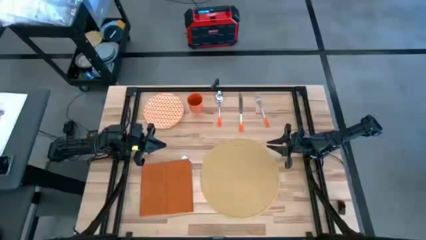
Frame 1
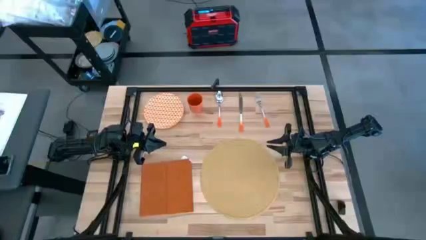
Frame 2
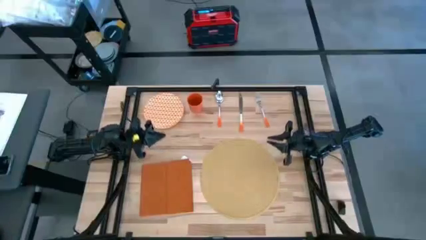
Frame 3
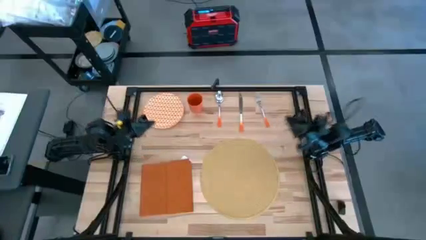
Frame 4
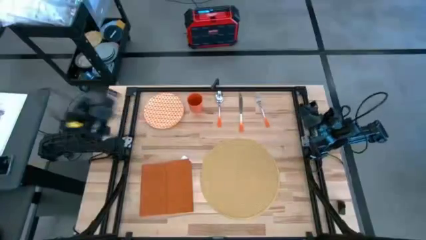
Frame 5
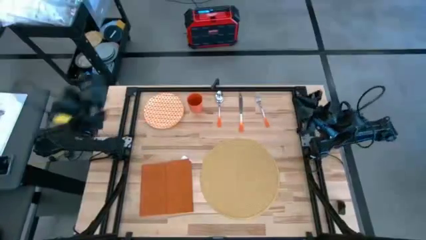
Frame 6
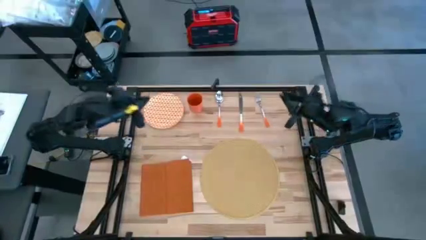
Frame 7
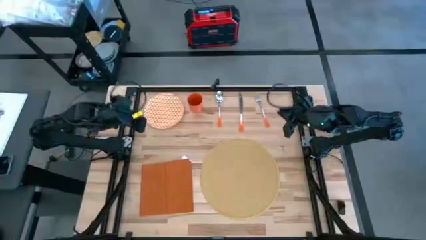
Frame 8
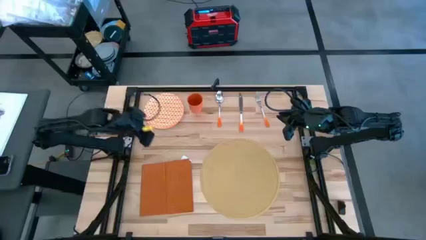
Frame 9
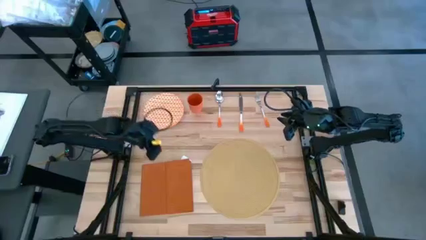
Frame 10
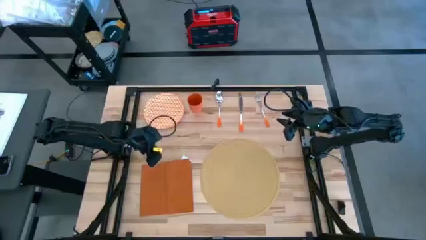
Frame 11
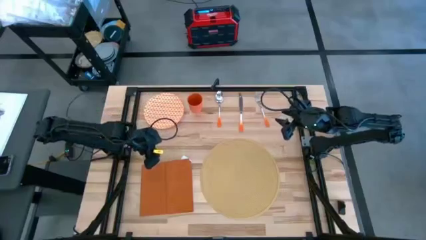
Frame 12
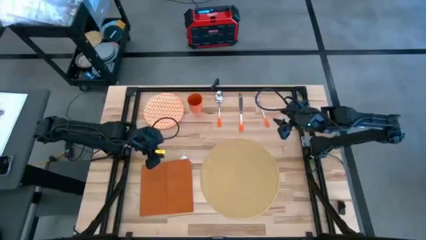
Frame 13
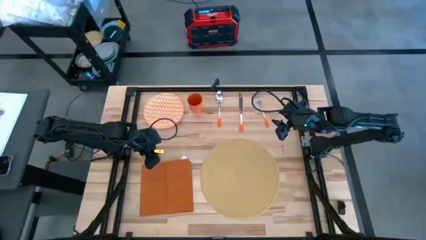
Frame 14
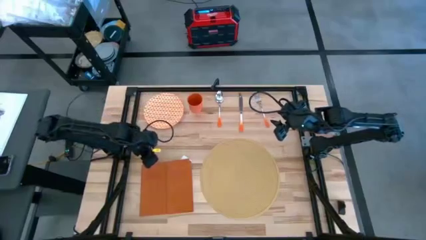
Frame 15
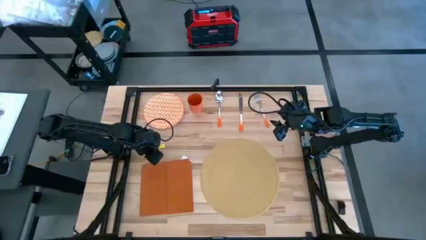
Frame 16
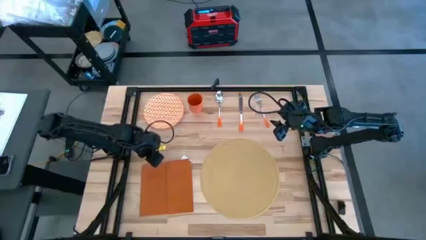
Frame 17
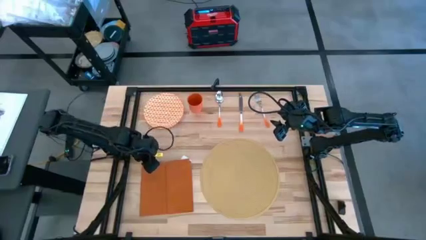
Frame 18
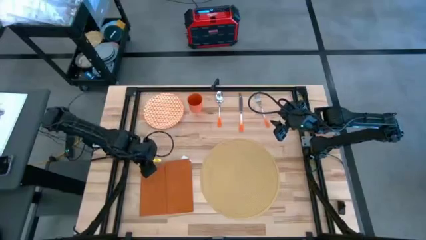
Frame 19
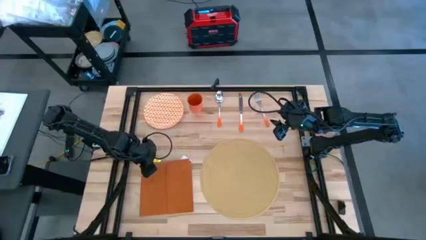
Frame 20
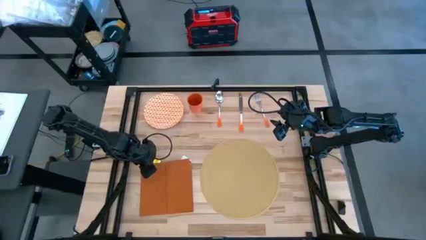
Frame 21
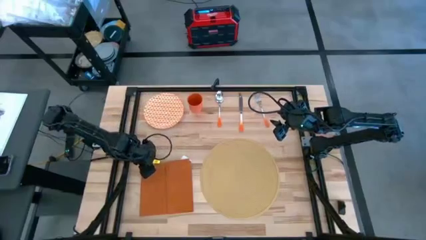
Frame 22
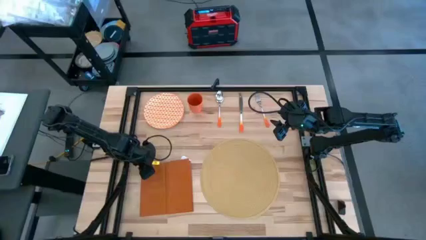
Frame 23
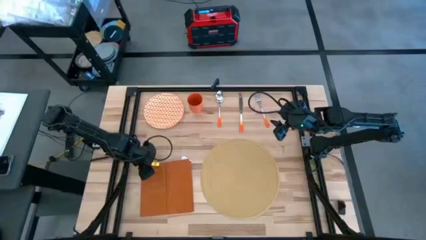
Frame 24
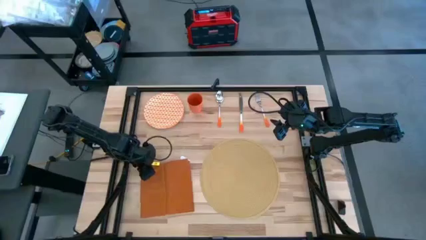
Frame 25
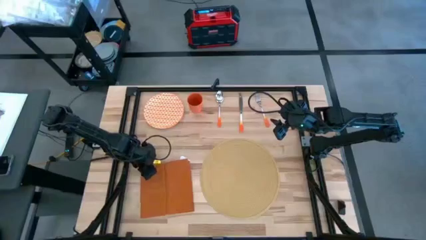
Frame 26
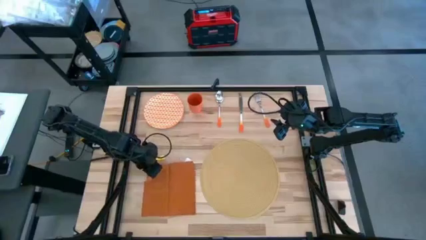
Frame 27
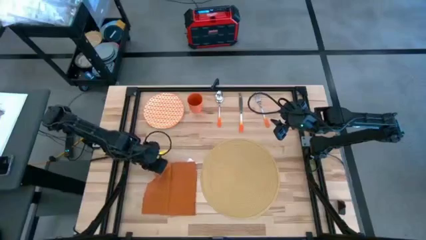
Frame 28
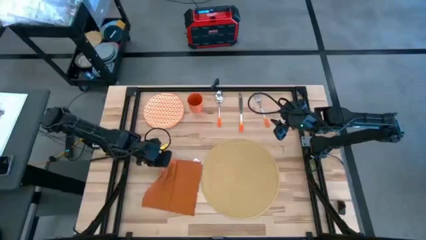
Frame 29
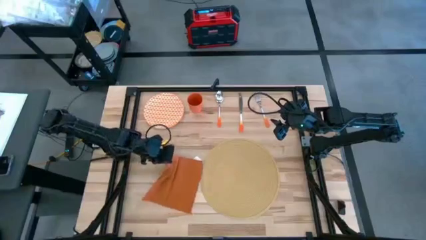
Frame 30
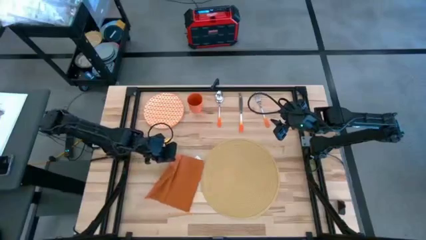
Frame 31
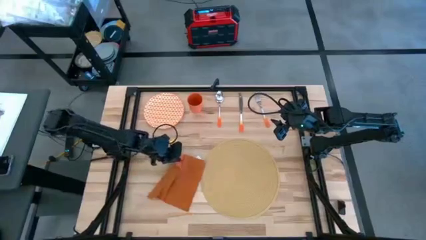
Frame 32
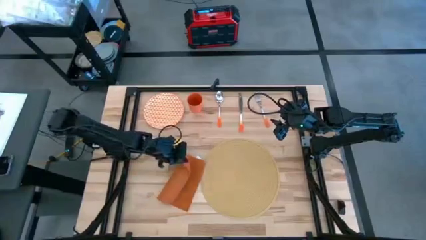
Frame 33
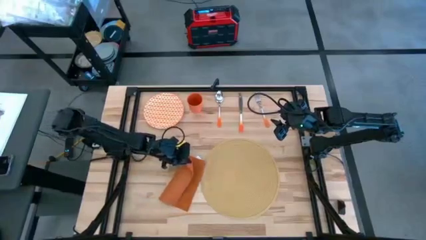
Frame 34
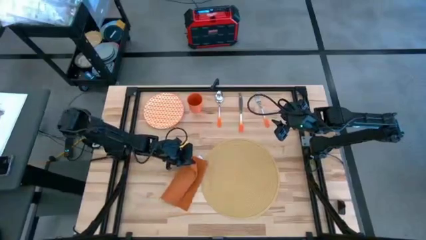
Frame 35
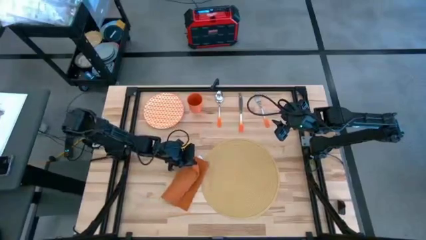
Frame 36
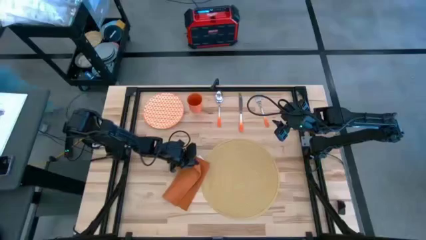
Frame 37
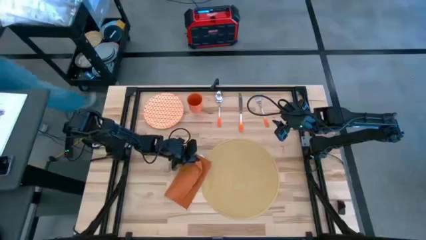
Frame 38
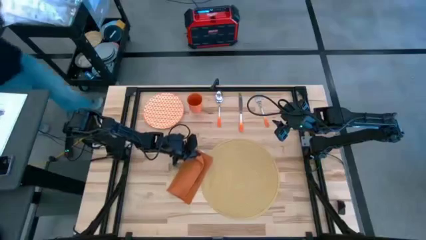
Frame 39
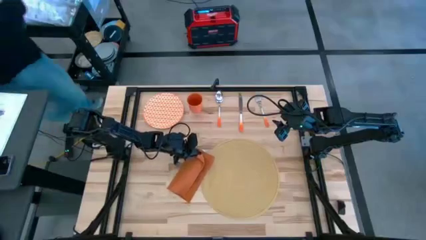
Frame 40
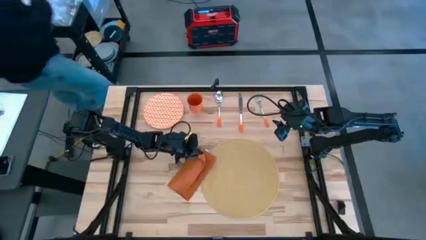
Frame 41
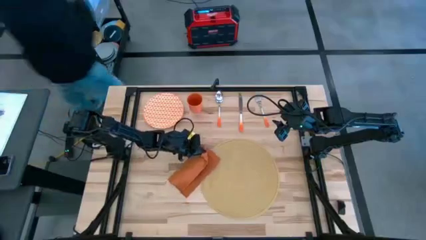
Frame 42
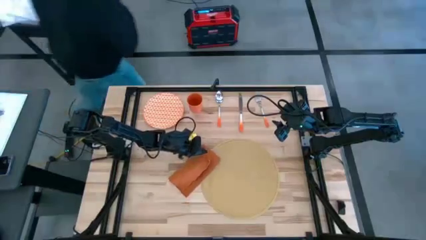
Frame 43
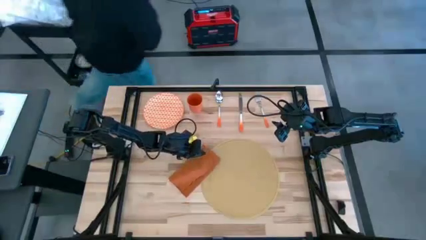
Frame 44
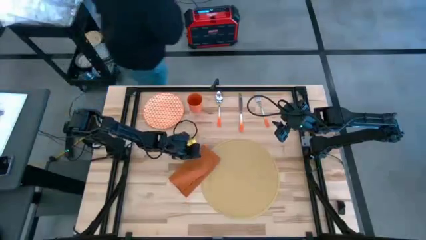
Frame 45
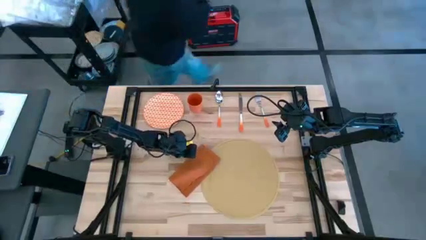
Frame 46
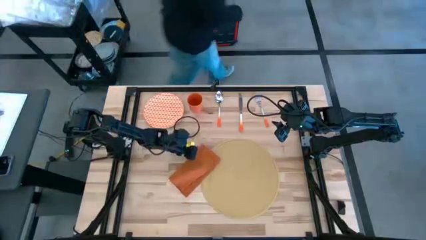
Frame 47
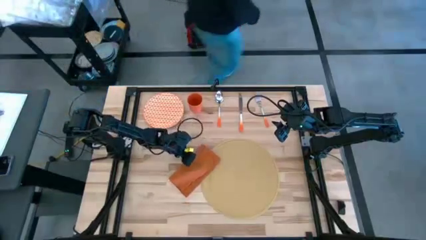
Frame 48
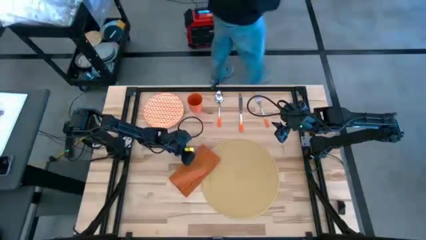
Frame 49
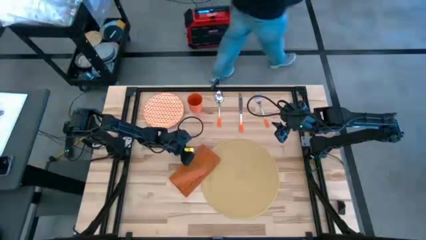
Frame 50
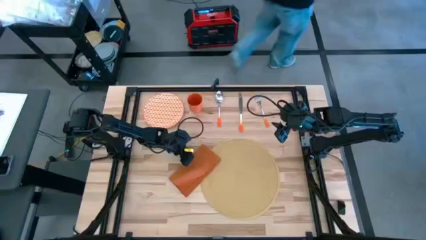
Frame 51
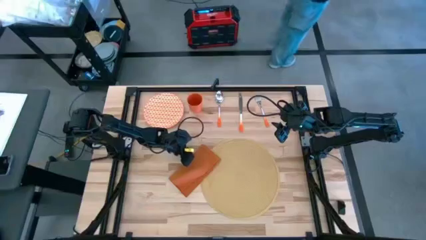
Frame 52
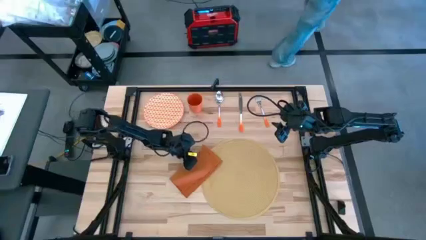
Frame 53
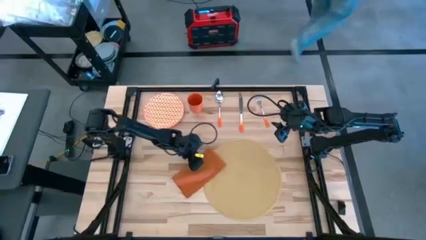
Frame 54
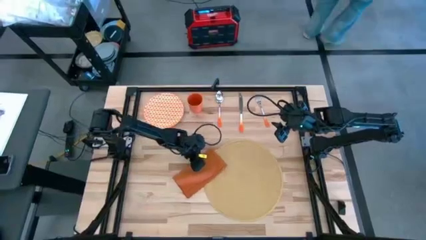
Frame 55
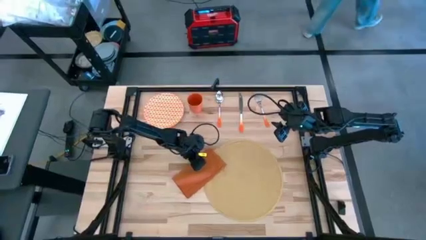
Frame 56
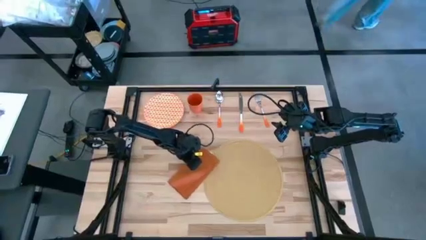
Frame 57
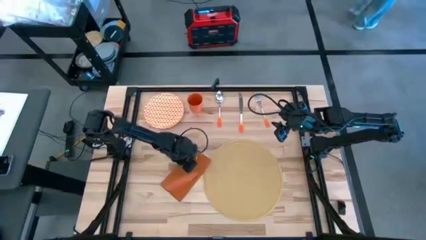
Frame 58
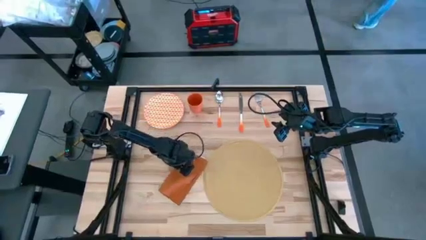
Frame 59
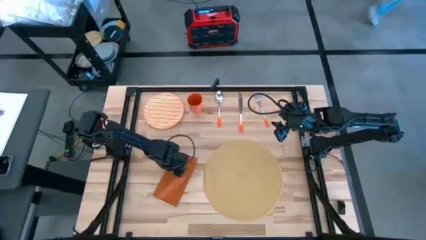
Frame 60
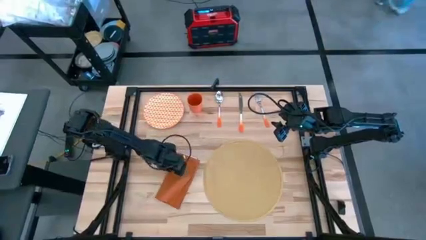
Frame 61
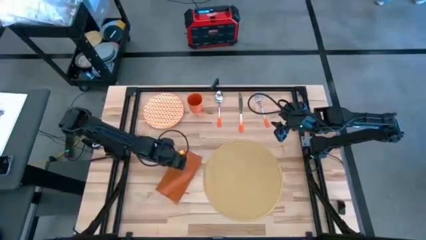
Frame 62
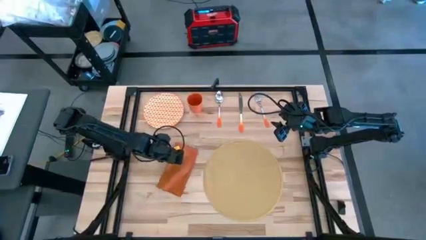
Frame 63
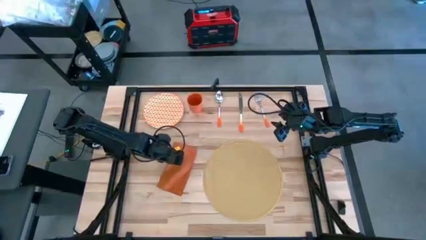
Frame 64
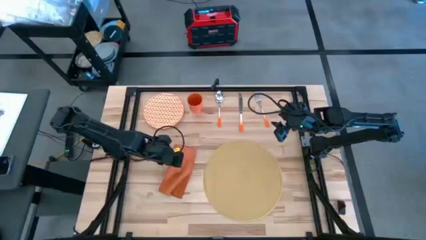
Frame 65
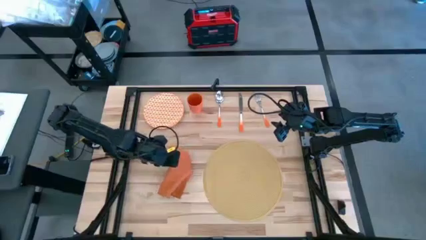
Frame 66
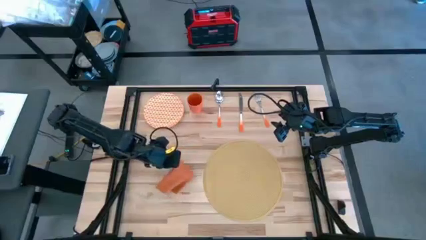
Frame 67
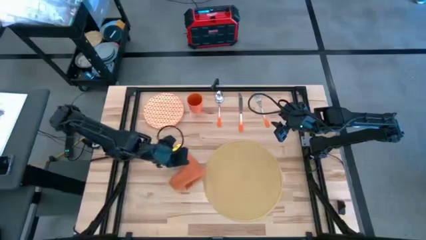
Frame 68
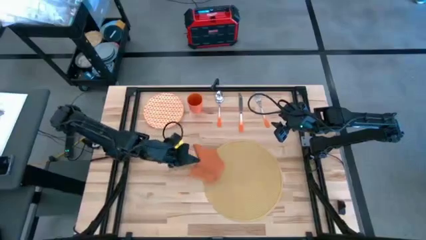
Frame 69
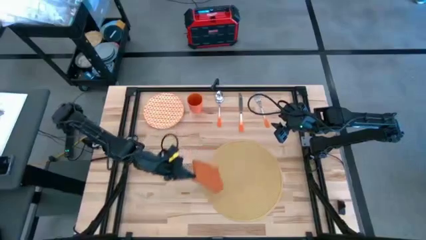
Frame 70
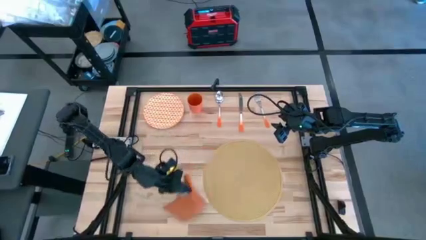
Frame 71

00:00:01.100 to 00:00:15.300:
Task: Set table place
Fold the orange table napkin
